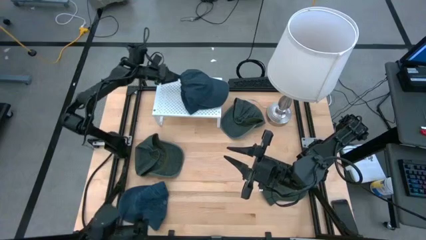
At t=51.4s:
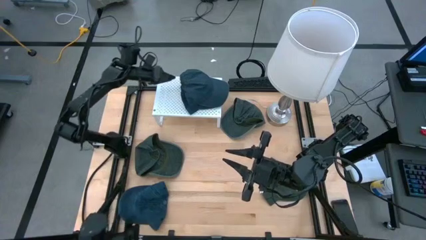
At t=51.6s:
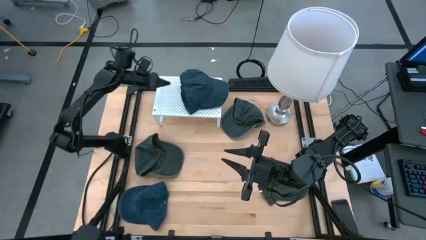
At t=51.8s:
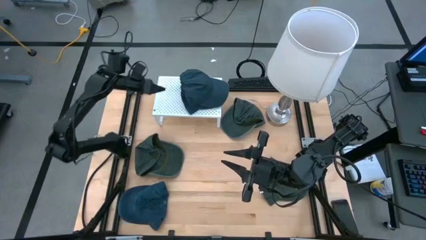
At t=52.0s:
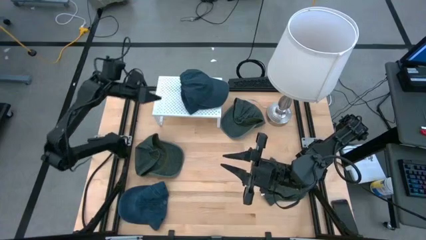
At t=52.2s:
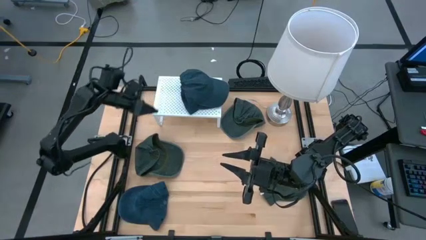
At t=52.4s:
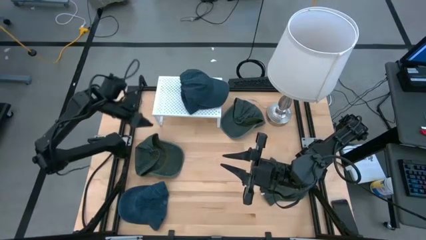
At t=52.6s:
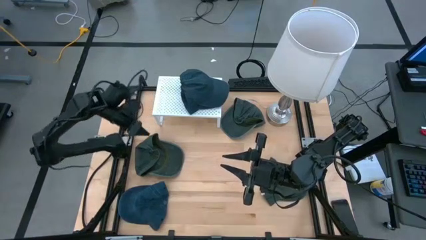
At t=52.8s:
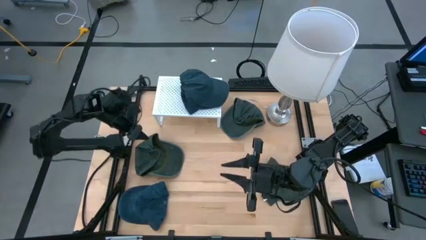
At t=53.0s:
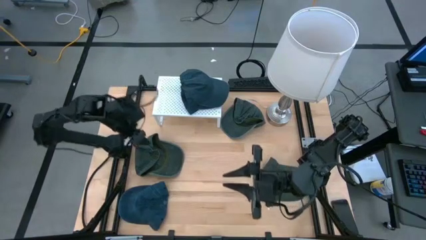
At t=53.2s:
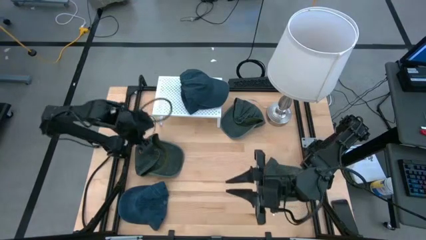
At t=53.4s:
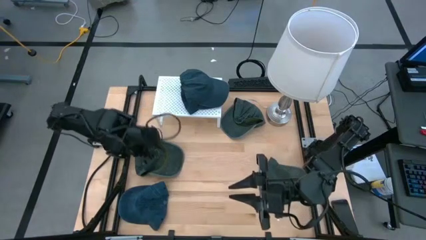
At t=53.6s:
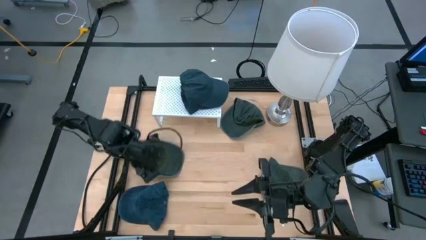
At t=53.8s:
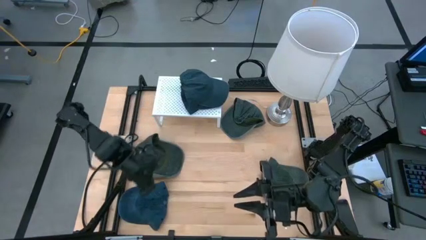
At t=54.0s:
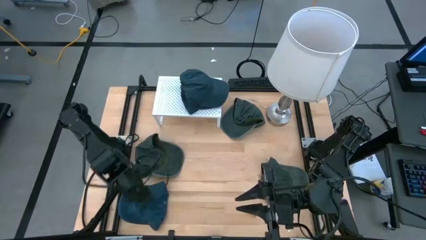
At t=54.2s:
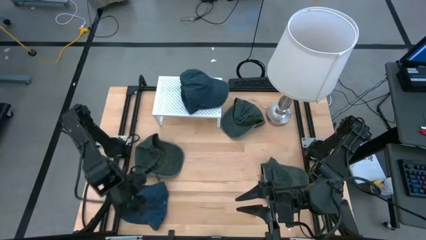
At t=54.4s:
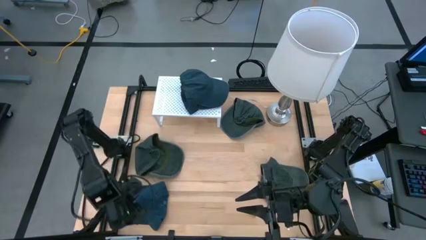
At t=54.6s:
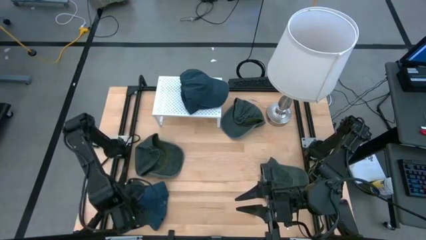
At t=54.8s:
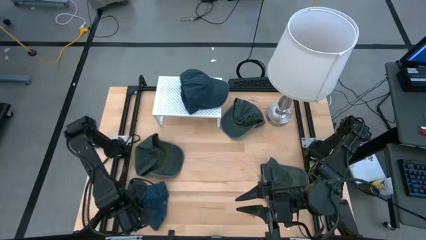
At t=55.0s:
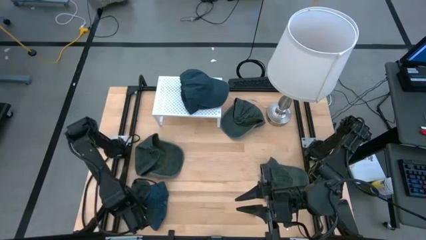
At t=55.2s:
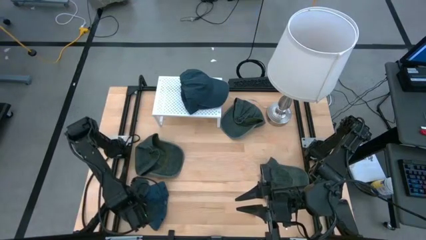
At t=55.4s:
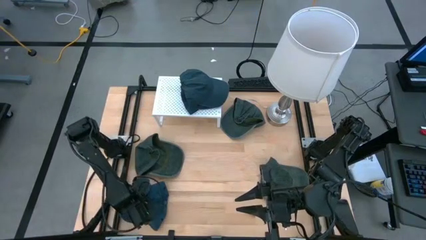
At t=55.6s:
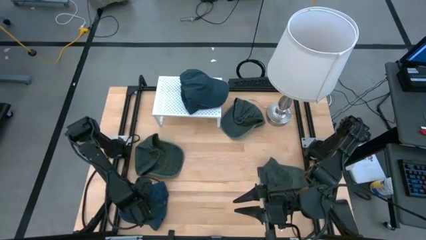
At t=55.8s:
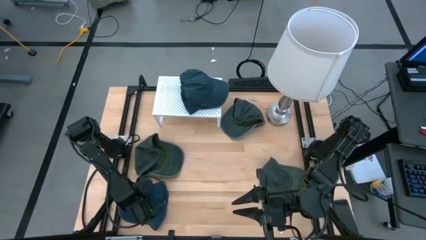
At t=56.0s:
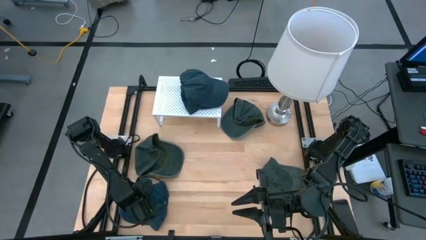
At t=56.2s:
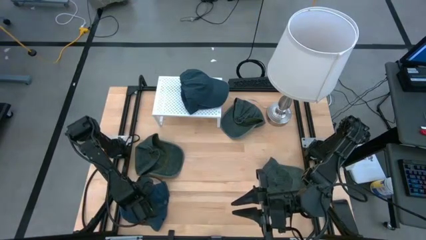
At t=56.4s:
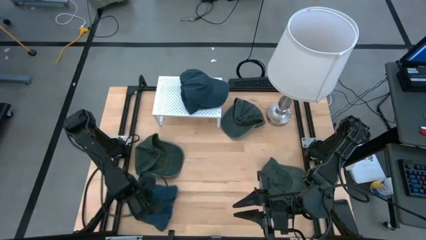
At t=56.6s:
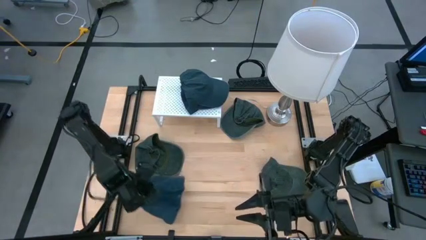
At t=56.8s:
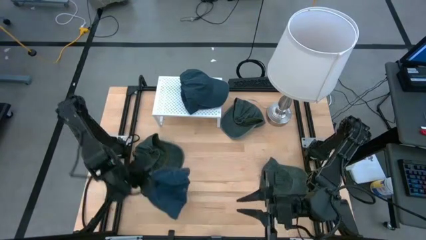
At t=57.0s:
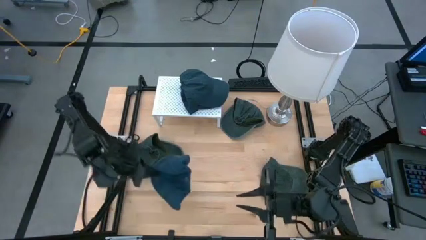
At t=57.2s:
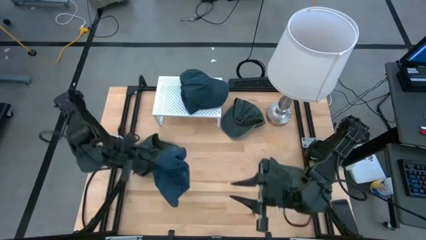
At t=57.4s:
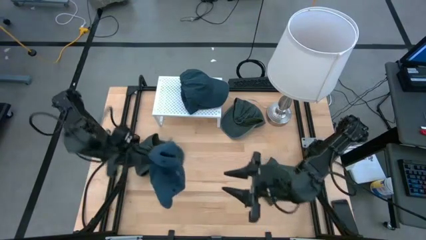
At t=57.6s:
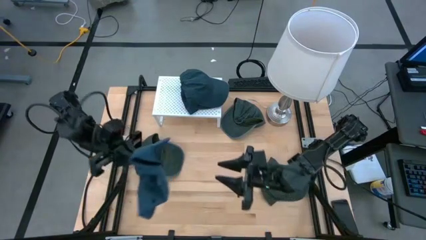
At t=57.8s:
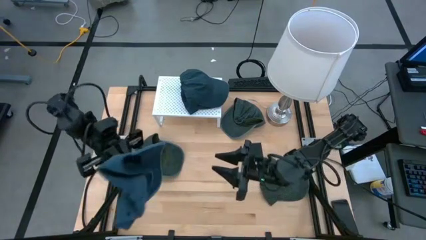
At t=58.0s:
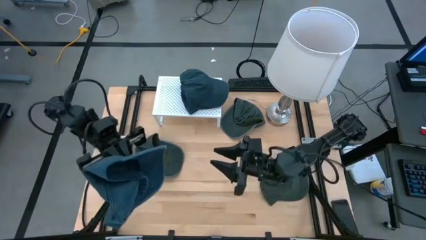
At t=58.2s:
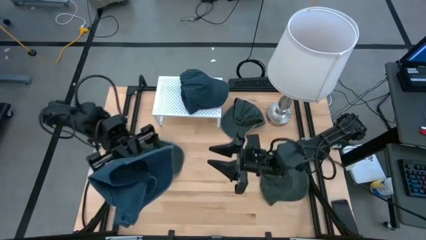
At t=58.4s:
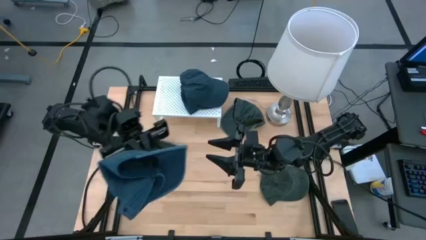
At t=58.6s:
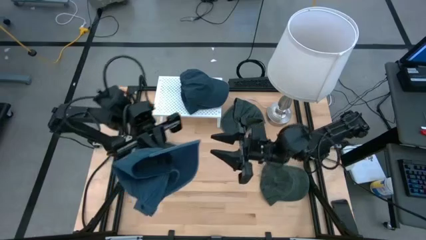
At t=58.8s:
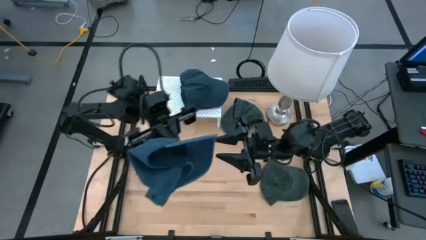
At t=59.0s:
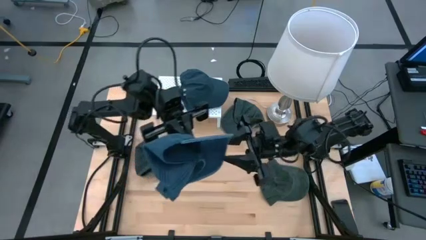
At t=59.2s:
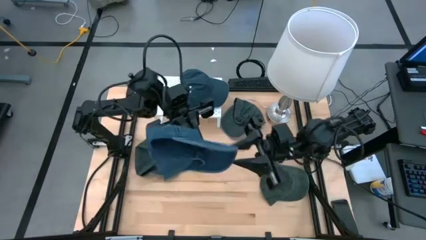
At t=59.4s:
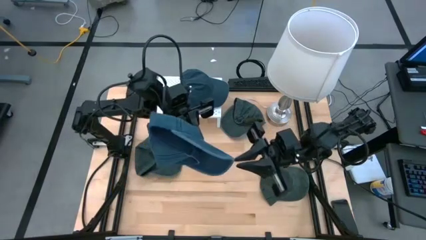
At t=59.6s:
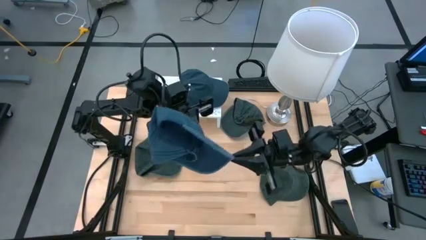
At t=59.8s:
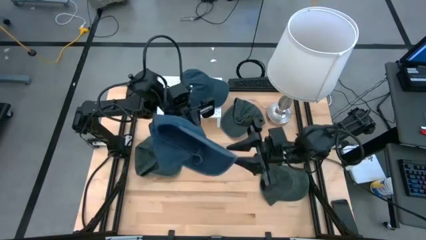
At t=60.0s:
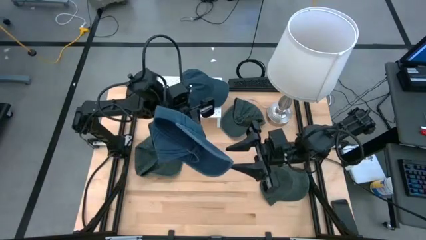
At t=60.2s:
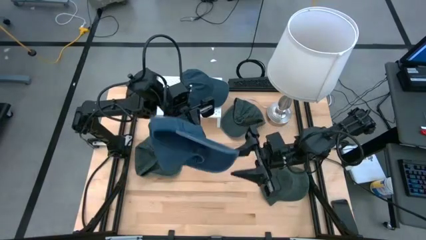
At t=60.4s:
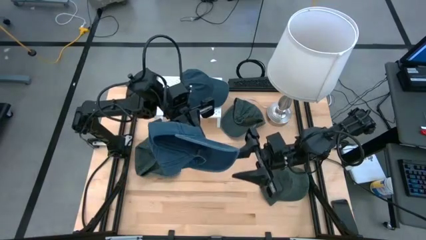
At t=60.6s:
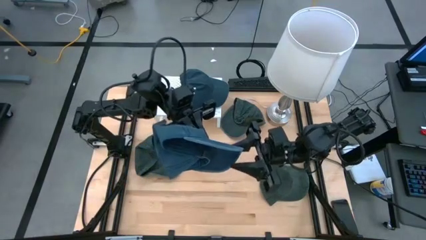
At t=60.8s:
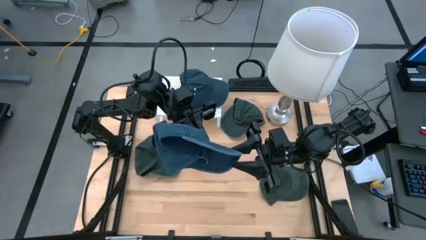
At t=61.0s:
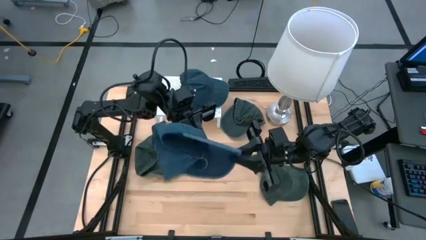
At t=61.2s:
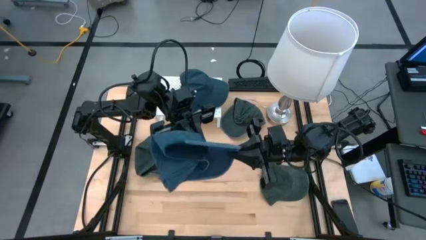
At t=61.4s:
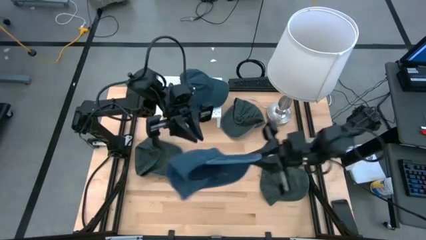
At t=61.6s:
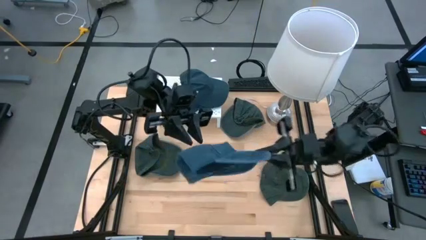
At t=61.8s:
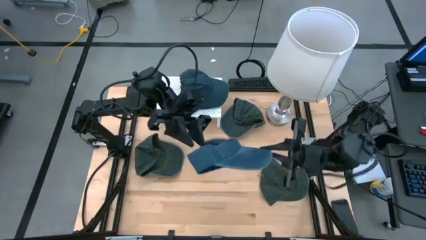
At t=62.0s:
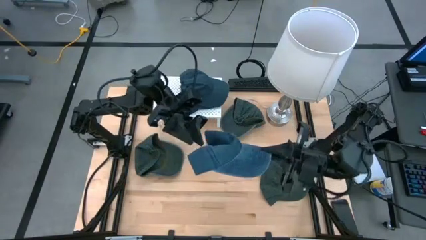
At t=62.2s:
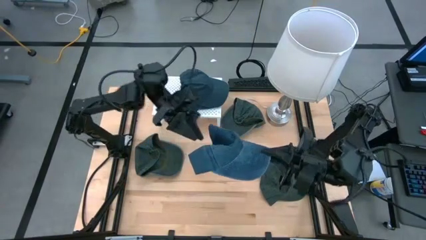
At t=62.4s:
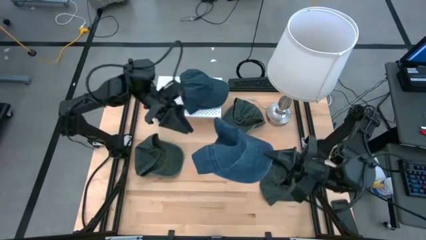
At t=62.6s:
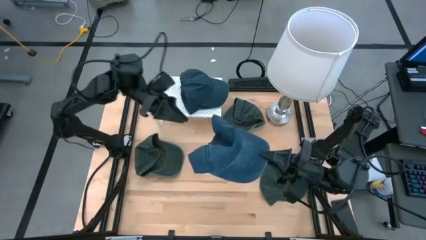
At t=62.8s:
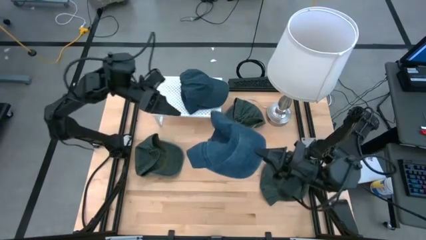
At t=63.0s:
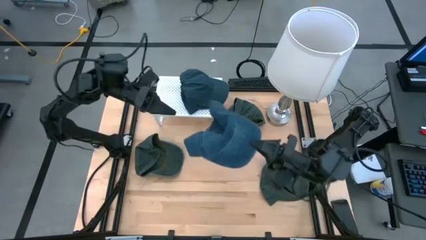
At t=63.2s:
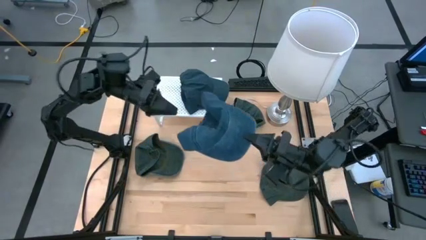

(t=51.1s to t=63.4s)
Task: Pick & Place hat
Stack the blue cap on the blue cap on the shelf
